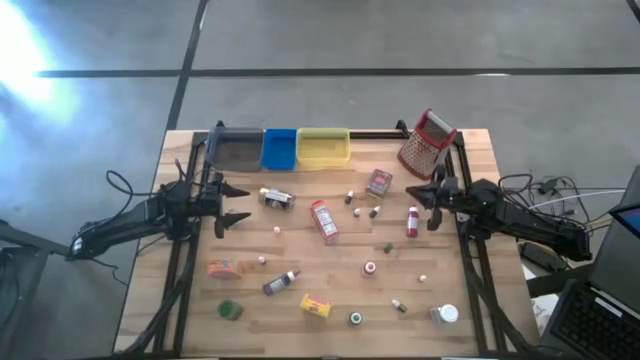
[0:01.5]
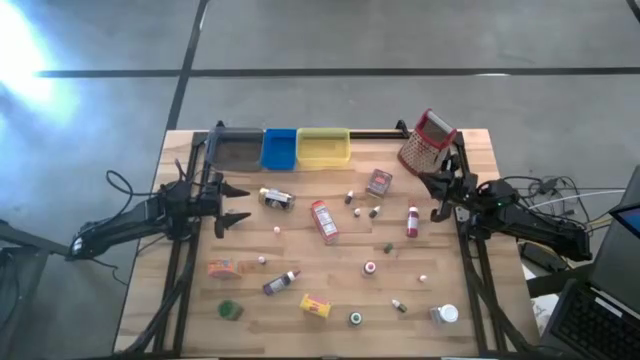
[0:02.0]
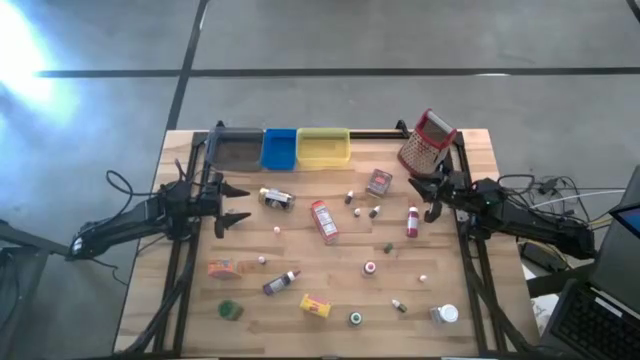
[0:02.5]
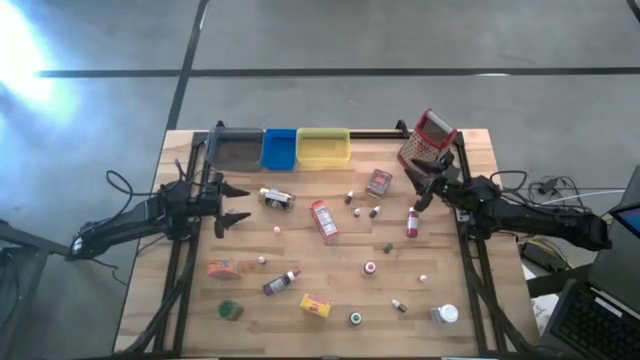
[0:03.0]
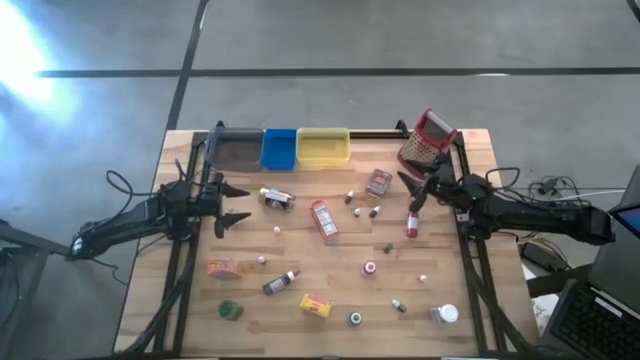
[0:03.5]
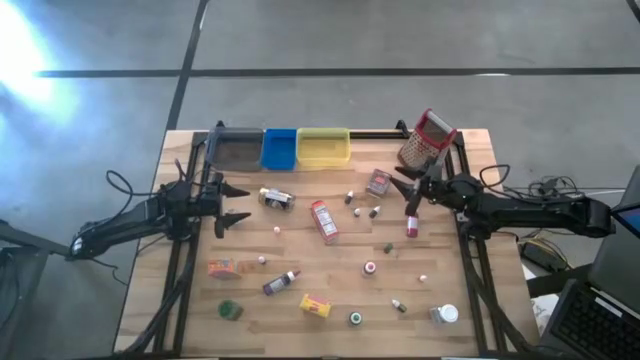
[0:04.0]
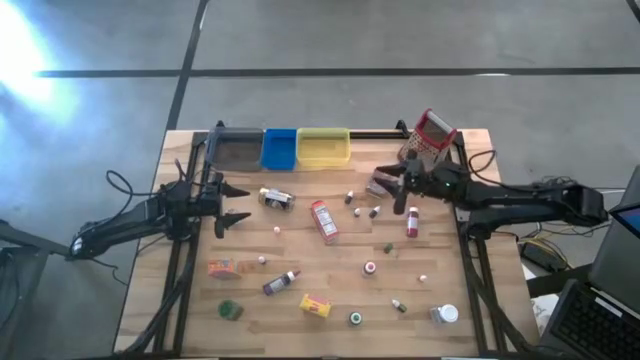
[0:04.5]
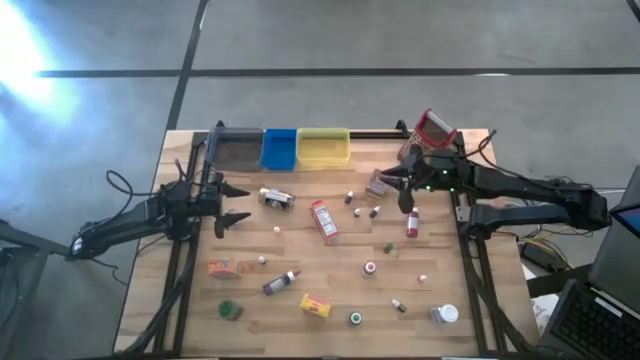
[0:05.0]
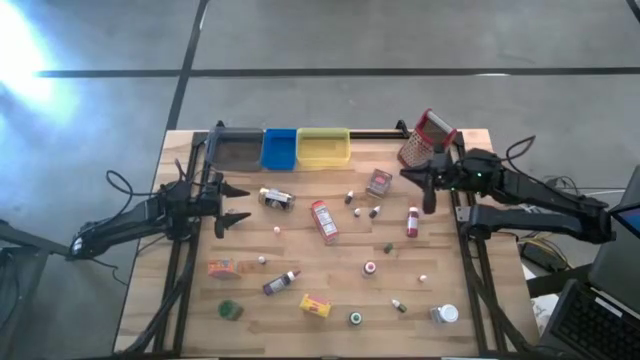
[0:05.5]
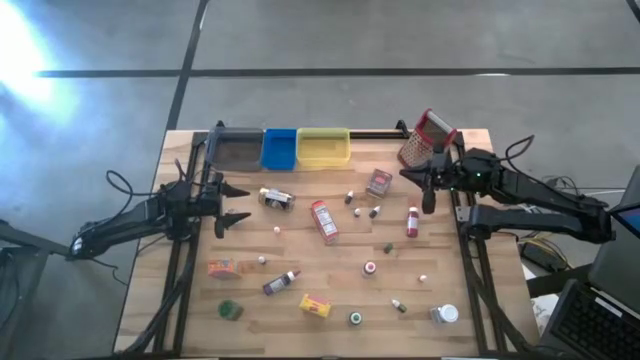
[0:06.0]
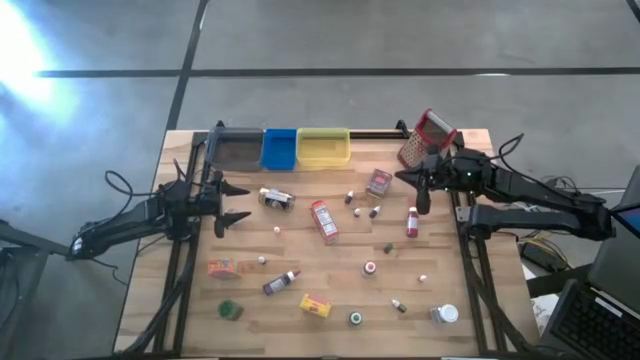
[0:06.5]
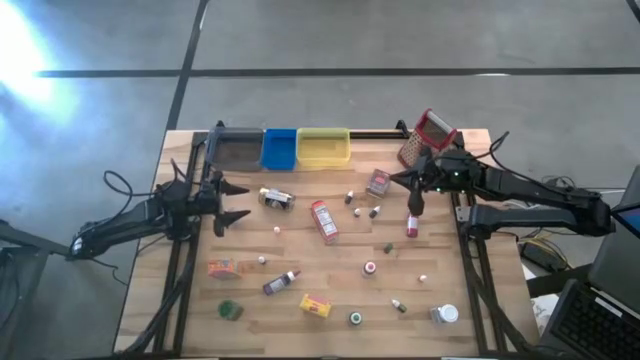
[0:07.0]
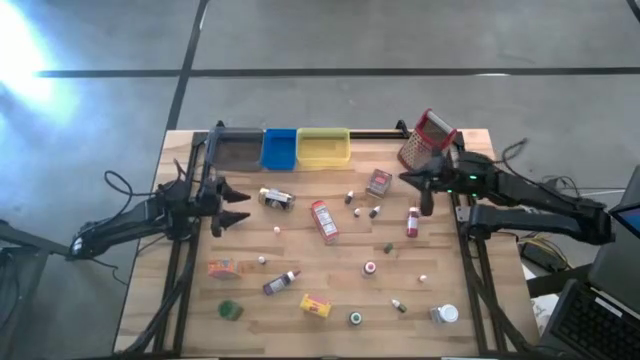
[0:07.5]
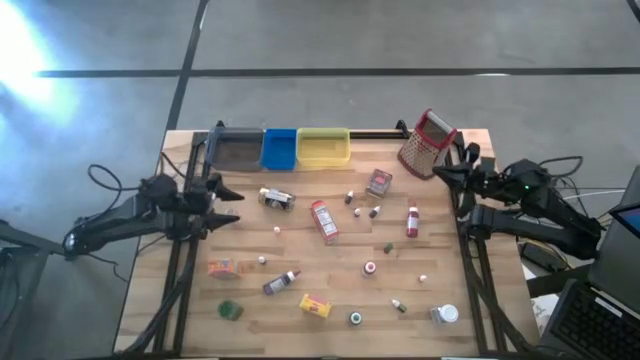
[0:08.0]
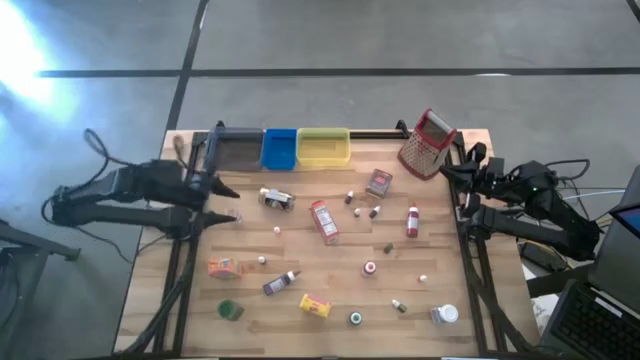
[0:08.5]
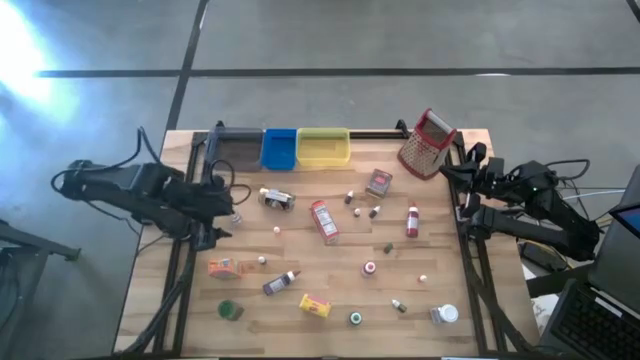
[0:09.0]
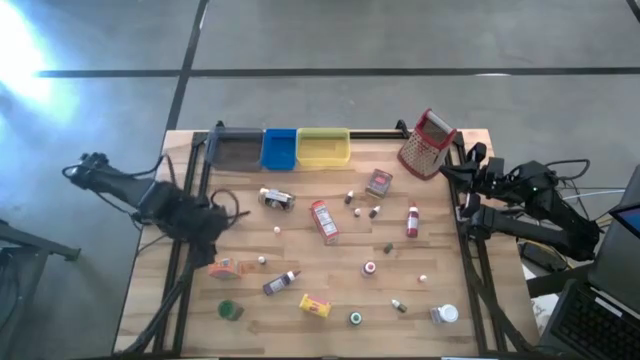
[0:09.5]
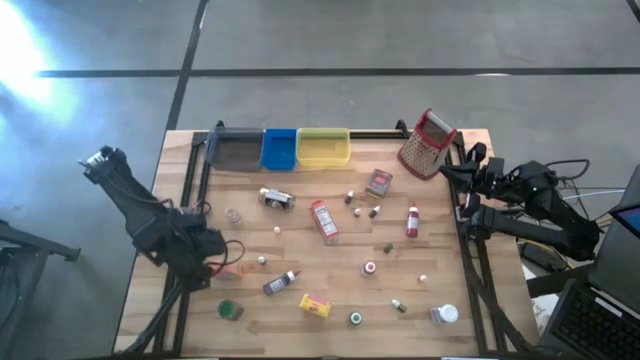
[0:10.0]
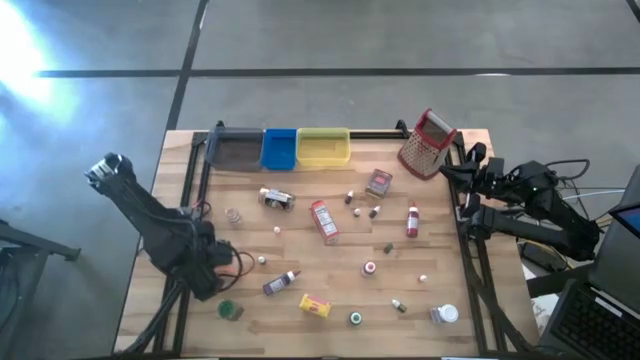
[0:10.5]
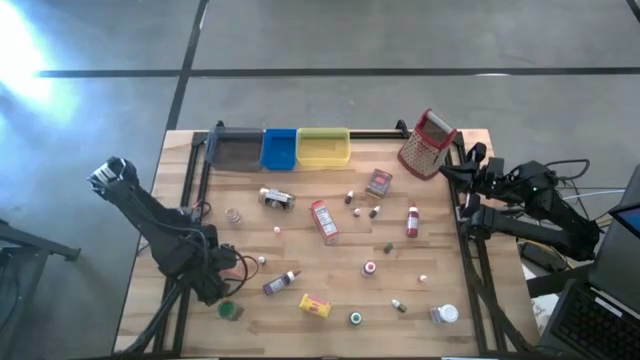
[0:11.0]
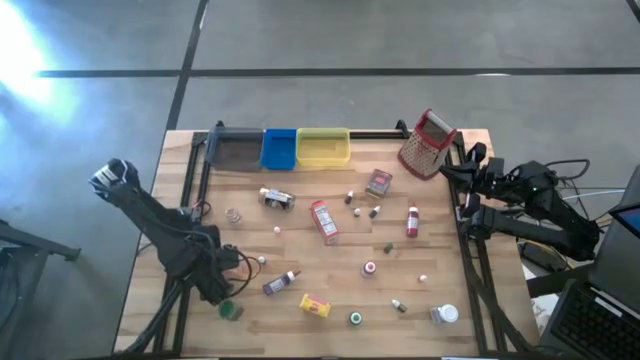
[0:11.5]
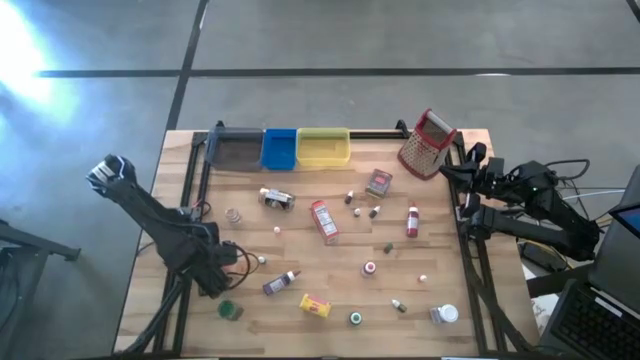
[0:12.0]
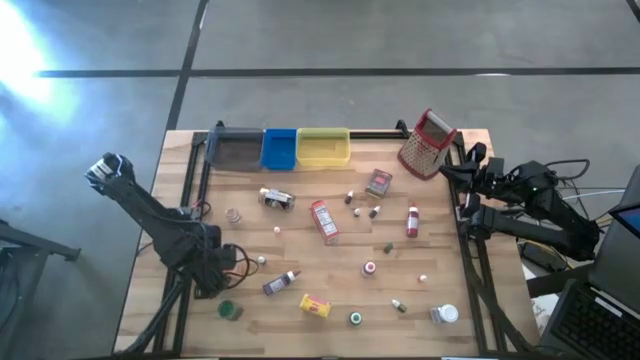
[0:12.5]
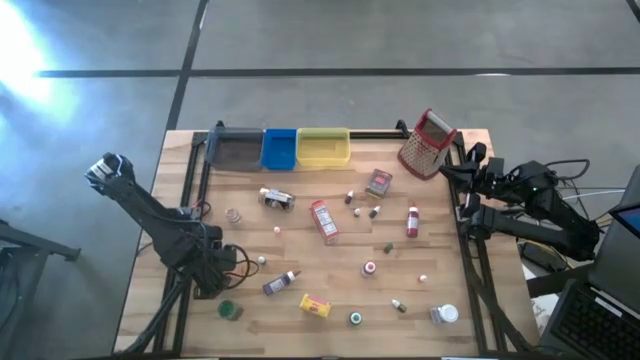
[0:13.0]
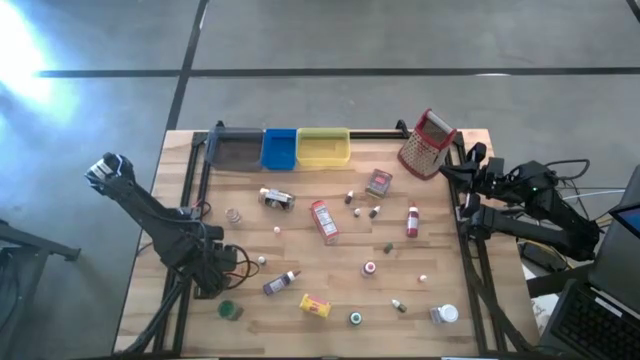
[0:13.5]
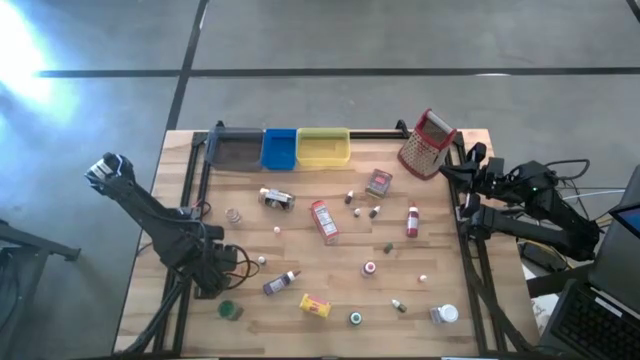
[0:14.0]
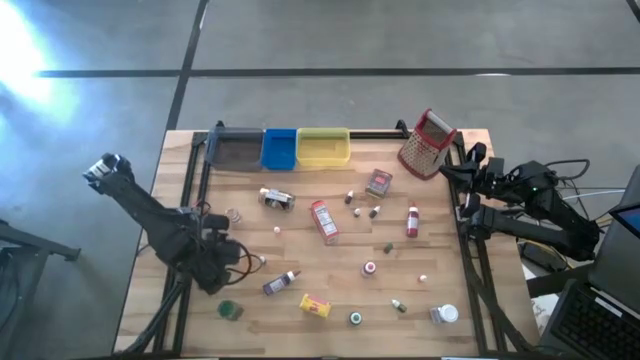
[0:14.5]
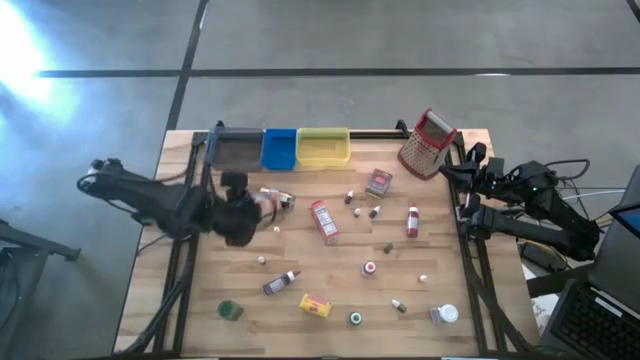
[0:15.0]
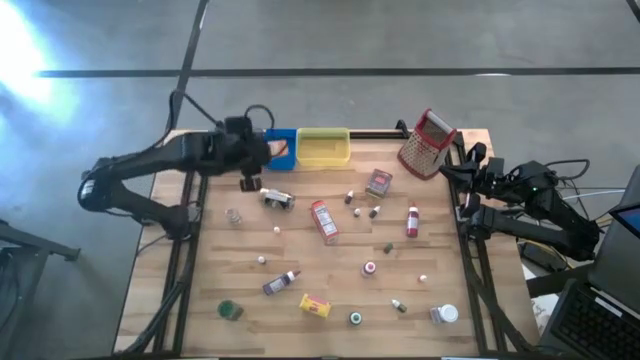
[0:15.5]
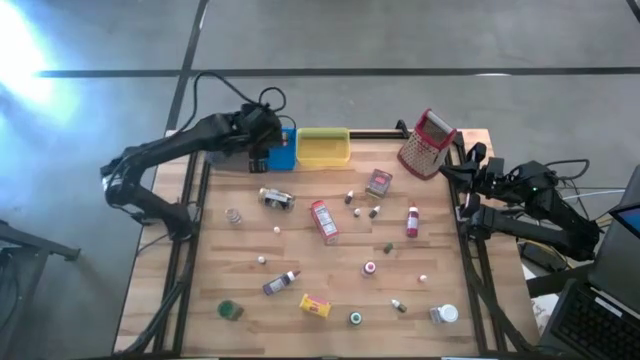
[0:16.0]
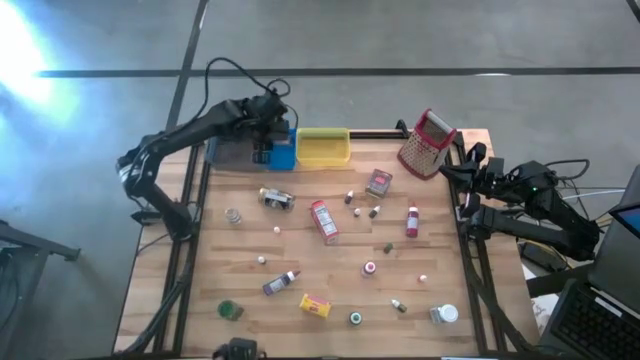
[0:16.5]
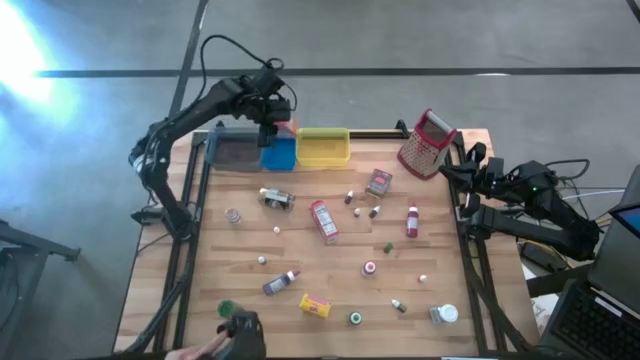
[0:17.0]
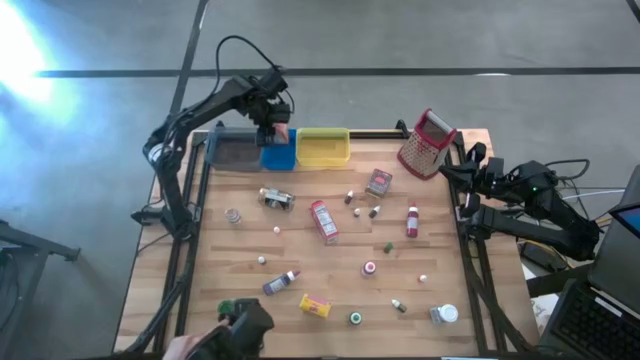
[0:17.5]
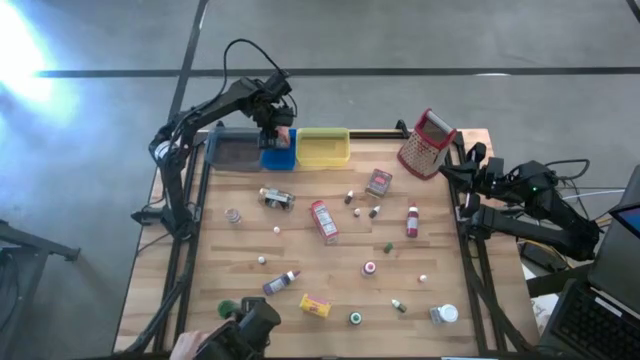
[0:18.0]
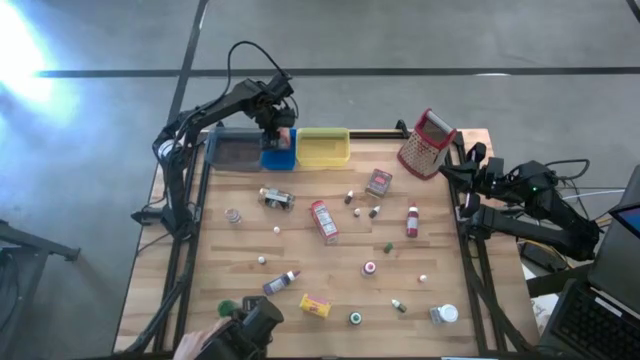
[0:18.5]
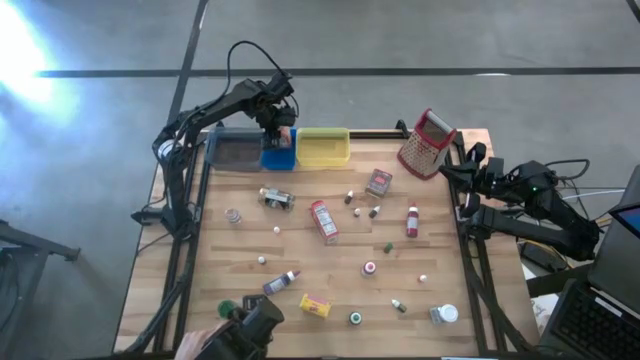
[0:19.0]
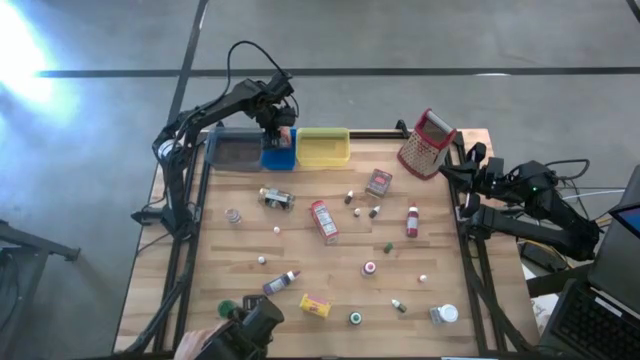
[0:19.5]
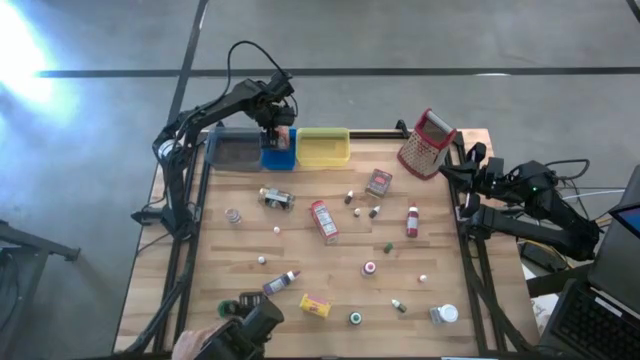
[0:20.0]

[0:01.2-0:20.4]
Task: Pick & Place Kitchen Items
Put the orange cereal box into the blue bin

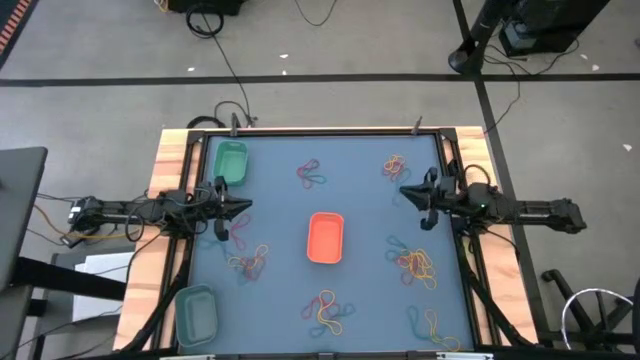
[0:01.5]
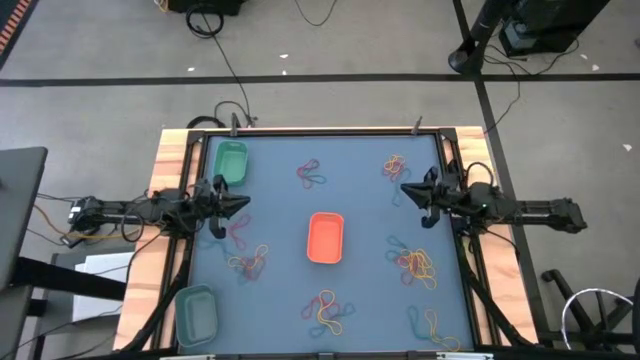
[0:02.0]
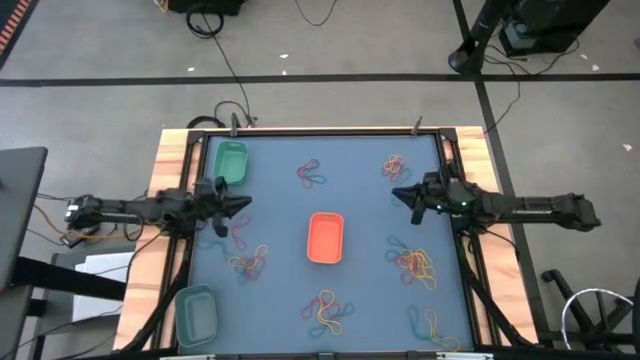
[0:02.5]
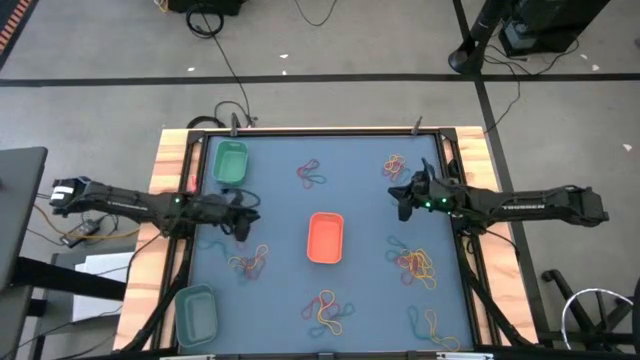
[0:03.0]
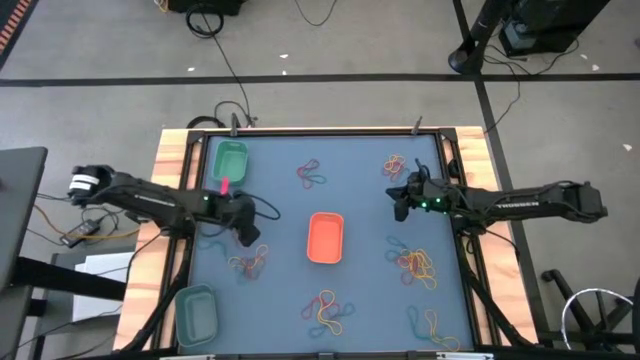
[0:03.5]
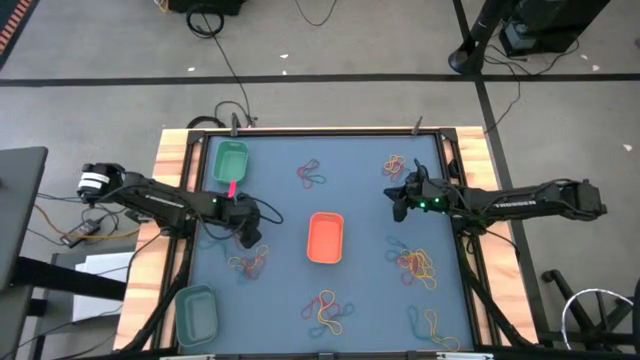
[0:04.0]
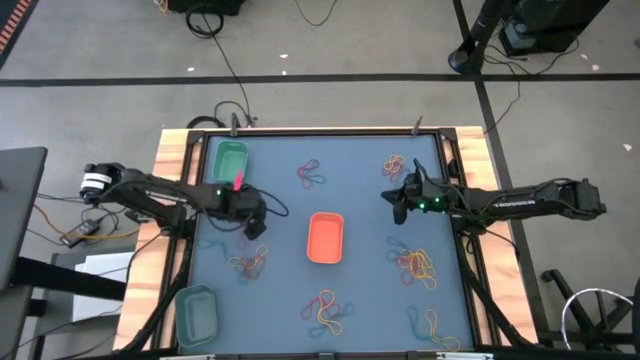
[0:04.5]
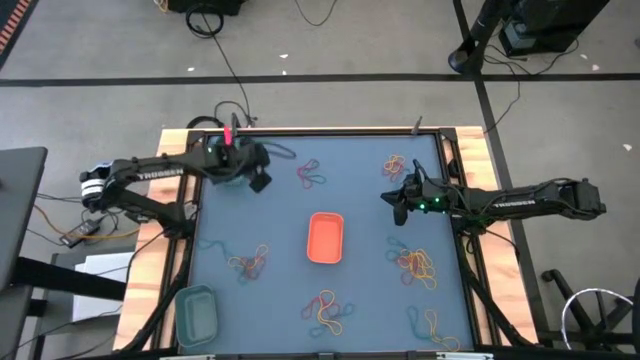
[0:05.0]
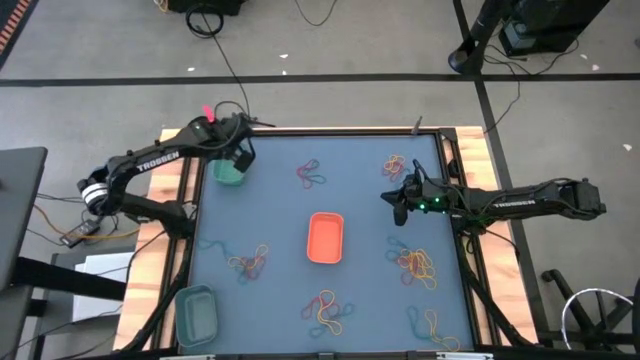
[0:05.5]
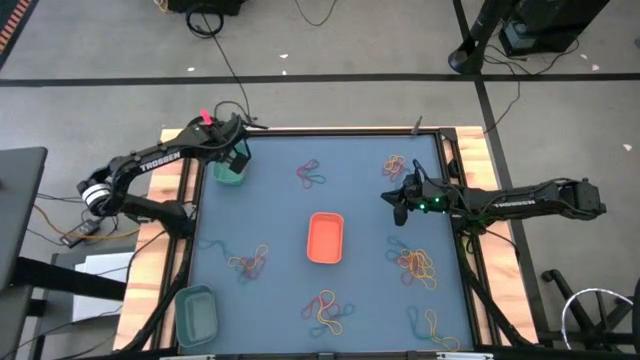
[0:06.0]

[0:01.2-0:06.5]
Task: Sort rubber bands into baskets
Put the red rubber band into the green bin
